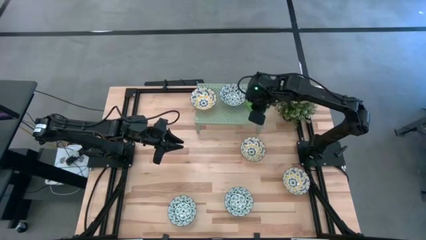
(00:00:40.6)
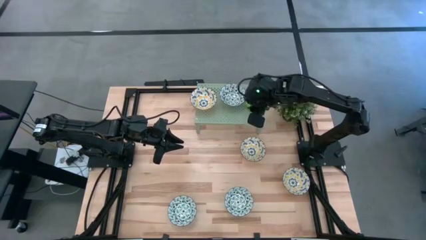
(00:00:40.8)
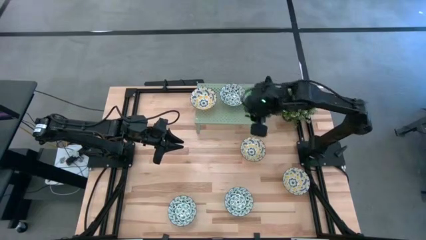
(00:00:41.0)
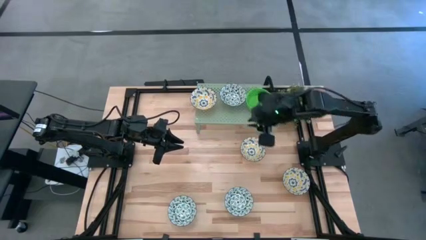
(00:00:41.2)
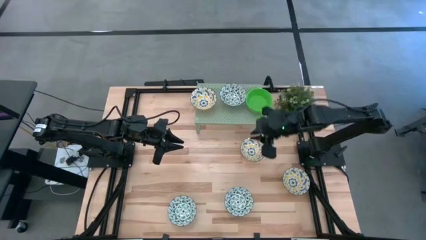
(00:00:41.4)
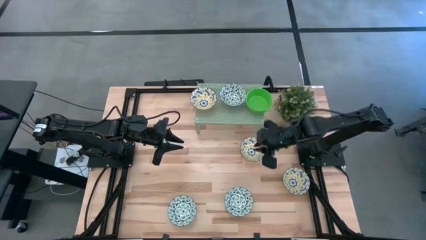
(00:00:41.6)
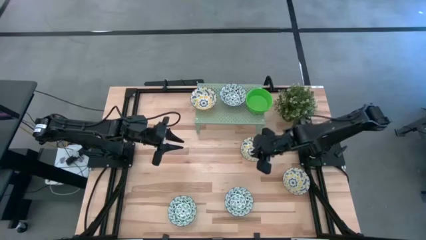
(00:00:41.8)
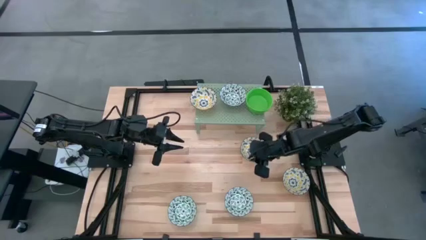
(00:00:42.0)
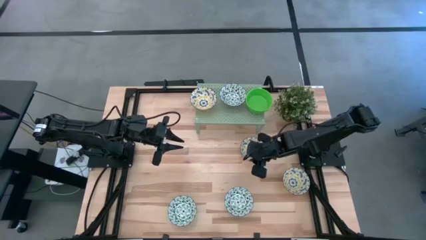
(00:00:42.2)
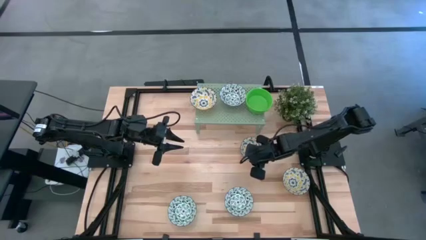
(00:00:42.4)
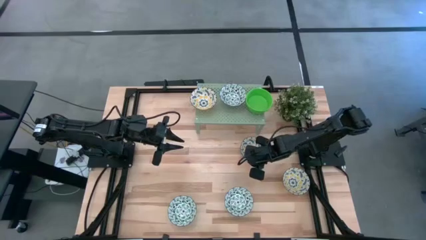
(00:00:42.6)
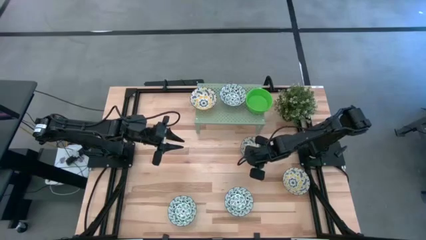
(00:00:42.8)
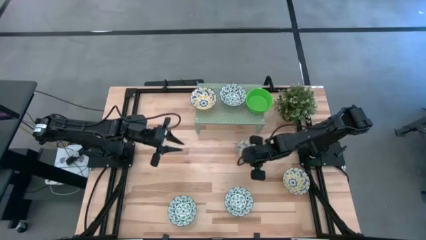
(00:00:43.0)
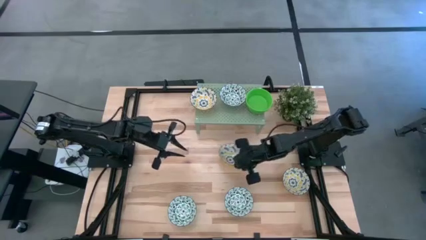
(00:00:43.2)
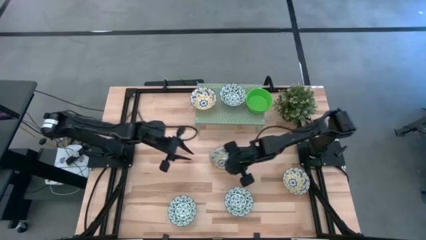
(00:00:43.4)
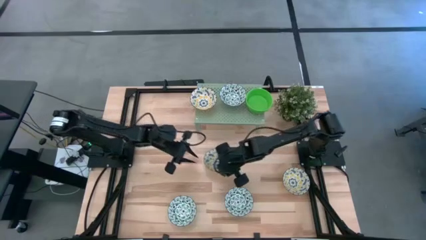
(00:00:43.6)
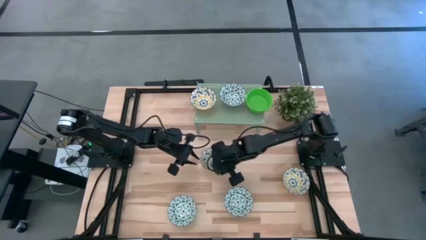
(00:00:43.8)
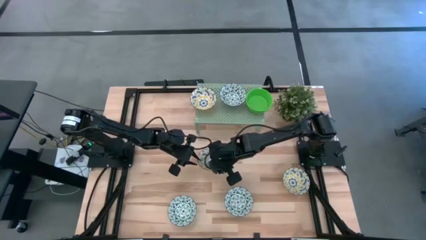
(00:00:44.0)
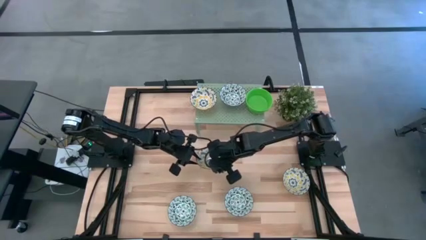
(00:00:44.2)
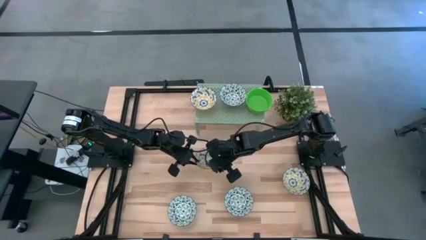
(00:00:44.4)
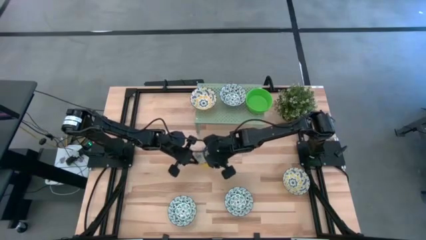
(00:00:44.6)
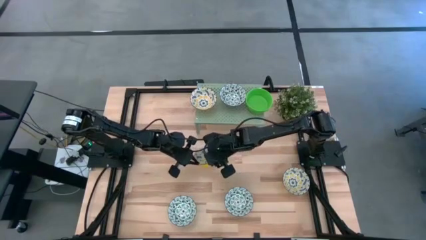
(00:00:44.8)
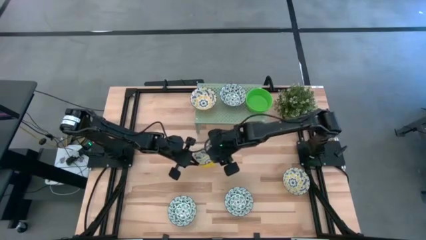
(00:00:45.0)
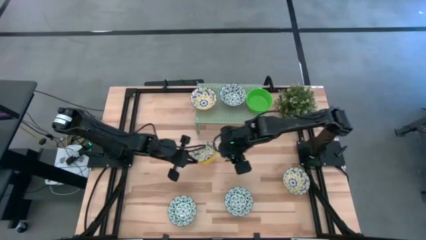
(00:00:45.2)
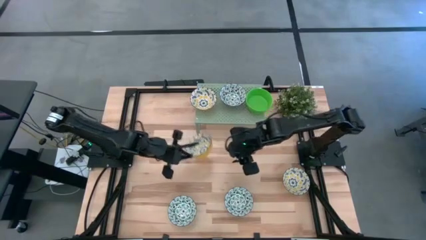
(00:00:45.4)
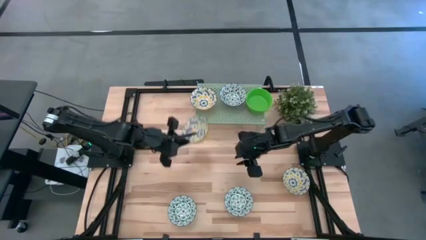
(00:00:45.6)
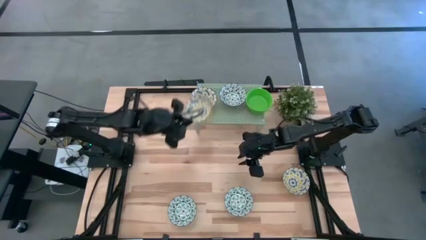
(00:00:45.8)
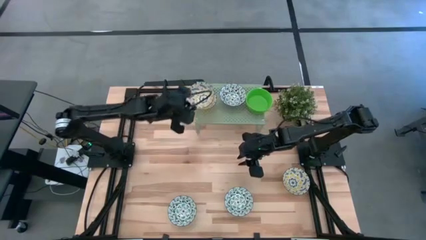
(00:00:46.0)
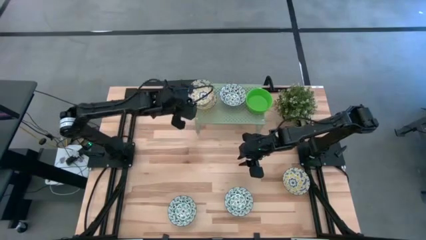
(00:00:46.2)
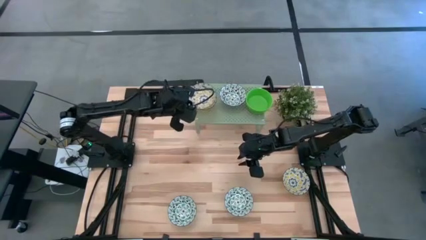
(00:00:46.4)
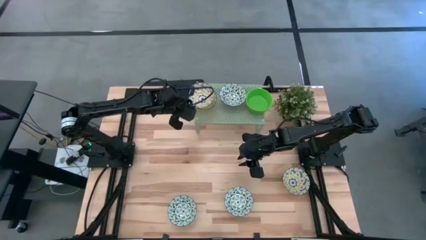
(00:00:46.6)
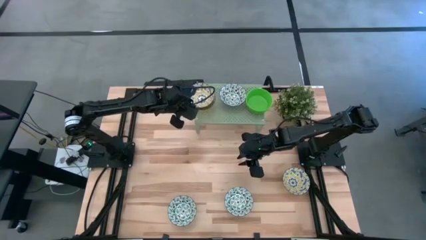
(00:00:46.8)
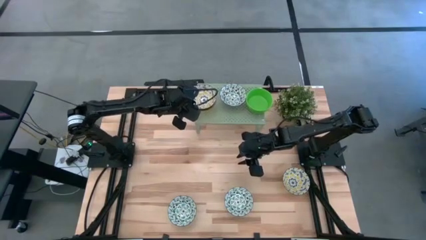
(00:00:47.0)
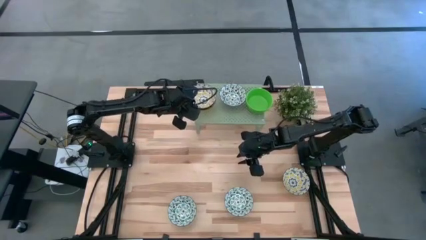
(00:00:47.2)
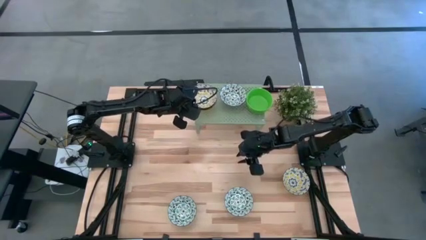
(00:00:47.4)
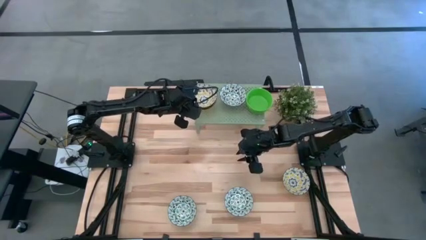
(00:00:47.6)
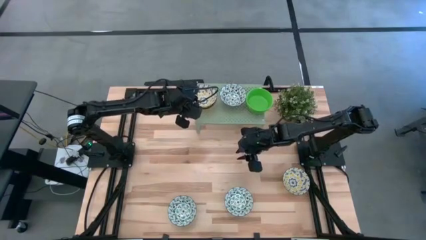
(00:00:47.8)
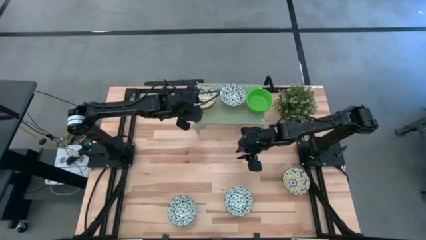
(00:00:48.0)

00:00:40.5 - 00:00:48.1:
Task: Pick & Place Mini bowls
Stack the top yellow patterned bowl on top of the other yellow patterned bowl on the shelf

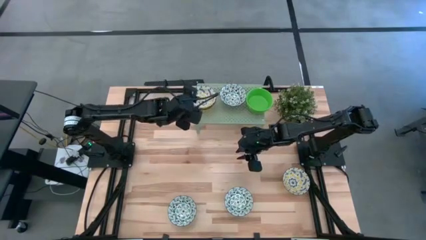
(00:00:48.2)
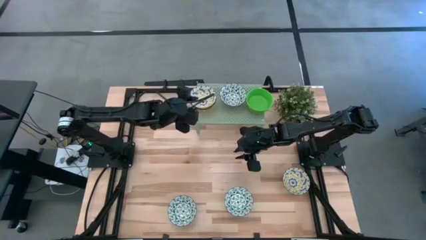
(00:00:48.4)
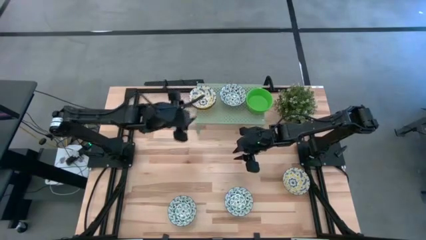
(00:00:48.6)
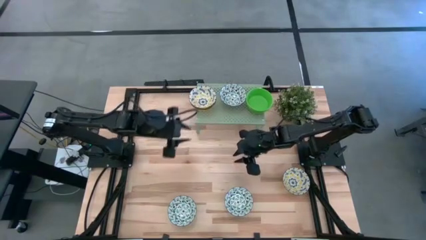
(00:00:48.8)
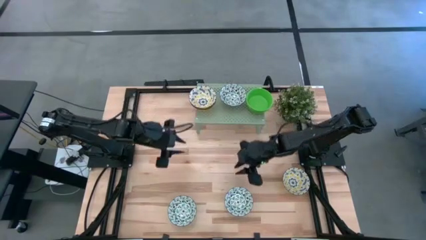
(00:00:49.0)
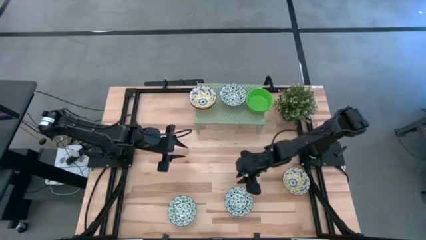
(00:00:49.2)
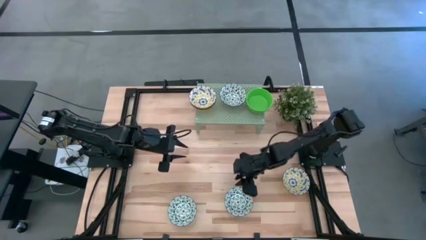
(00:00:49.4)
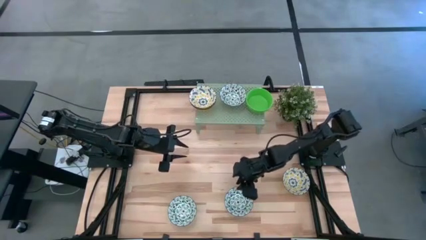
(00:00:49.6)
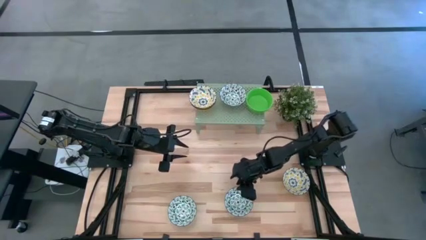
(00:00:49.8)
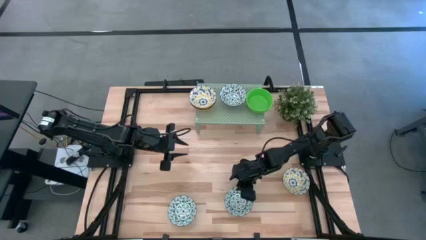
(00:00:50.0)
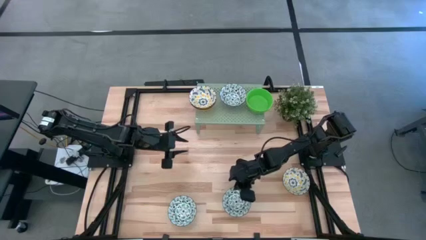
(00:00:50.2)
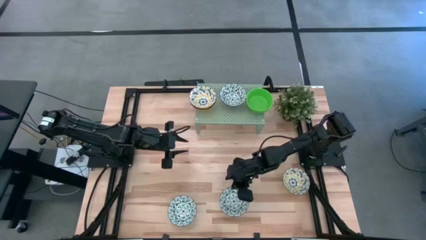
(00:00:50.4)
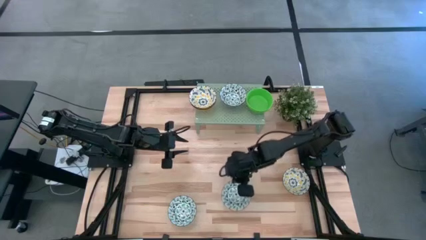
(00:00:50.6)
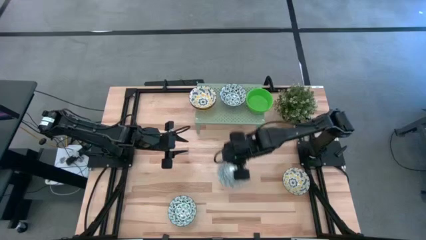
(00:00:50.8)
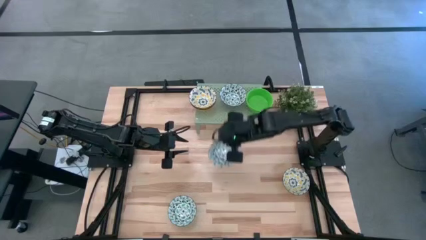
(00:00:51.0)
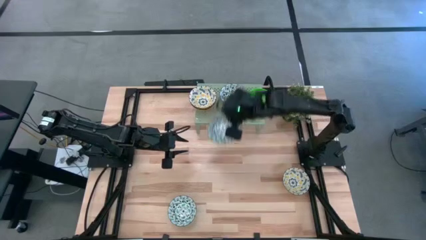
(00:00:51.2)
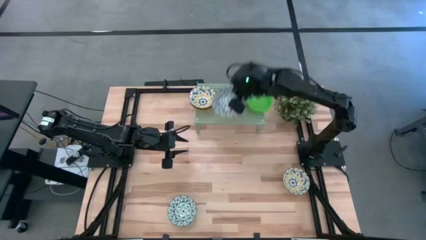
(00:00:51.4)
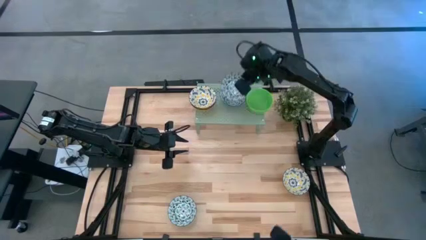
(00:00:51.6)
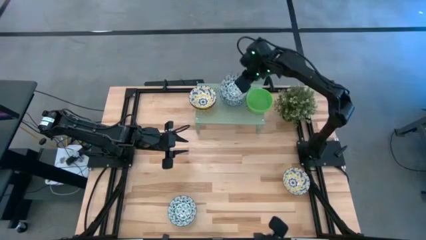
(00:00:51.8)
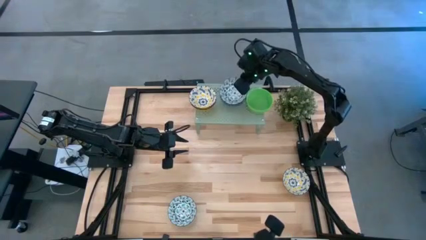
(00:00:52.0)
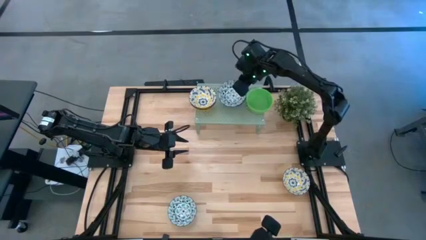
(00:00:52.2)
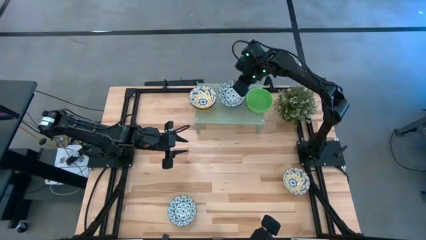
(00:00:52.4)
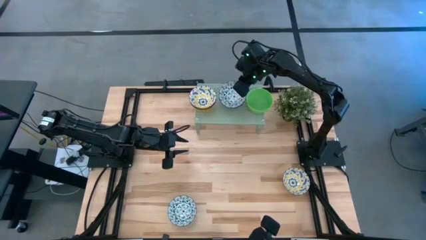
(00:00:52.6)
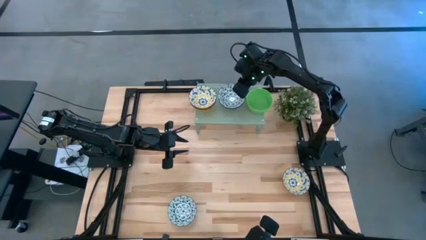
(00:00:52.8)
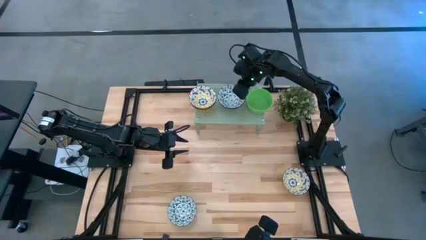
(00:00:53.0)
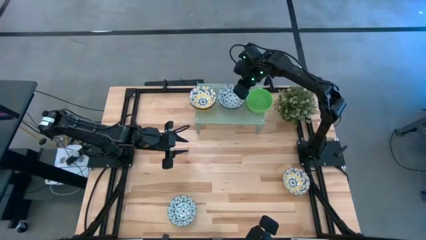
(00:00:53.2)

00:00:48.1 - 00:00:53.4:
Stack the green patterned bowl on top of the other green patterned bowl on the shelf
